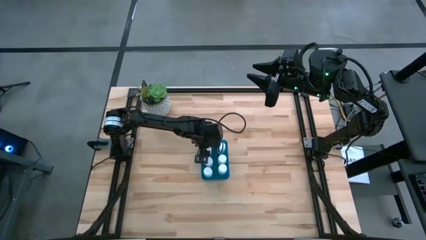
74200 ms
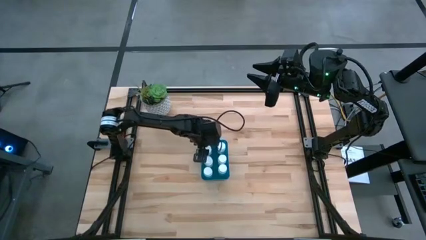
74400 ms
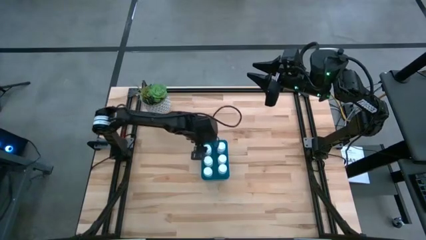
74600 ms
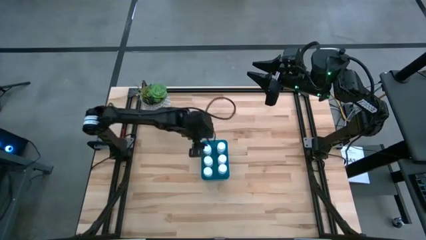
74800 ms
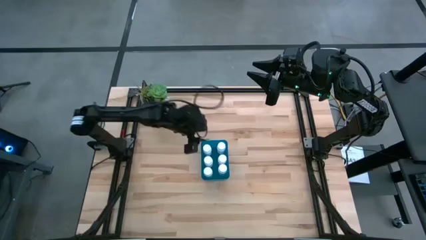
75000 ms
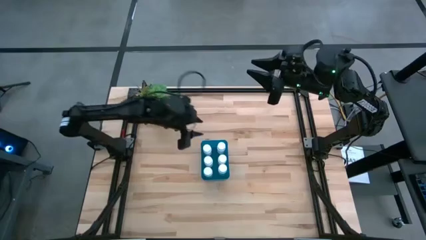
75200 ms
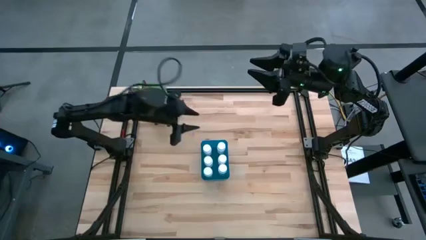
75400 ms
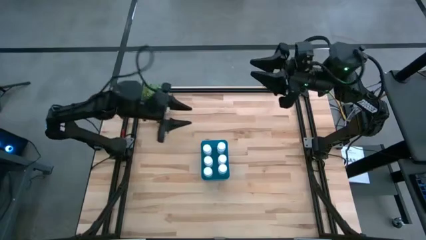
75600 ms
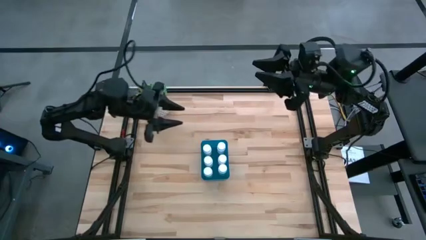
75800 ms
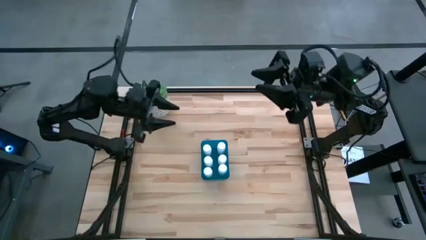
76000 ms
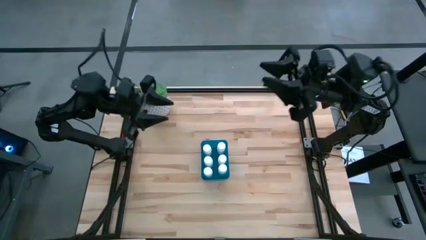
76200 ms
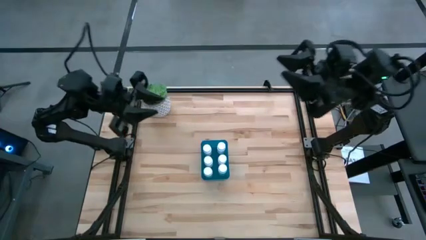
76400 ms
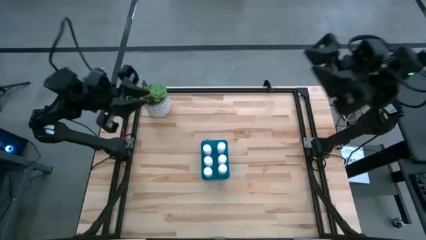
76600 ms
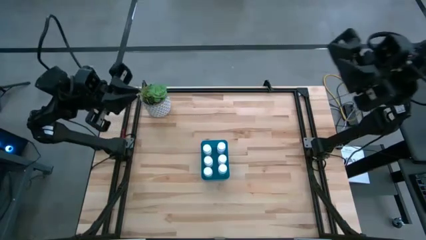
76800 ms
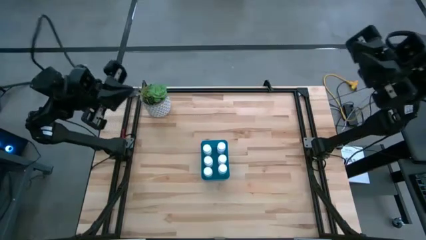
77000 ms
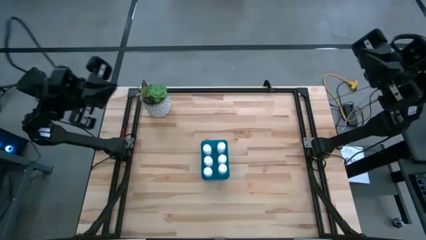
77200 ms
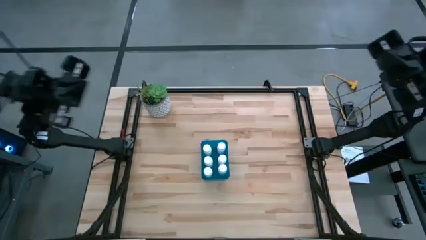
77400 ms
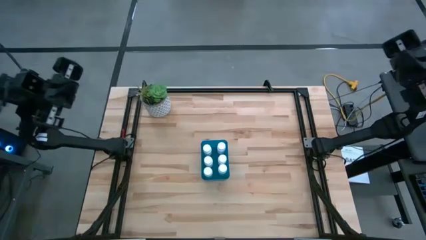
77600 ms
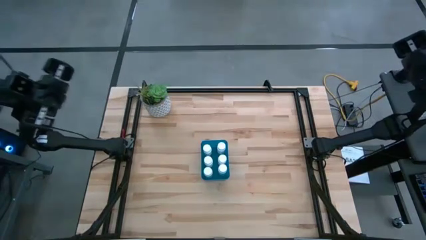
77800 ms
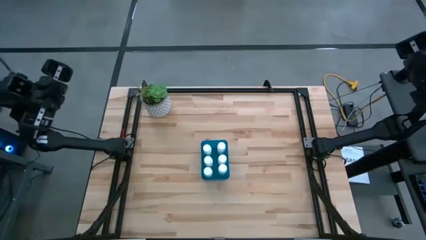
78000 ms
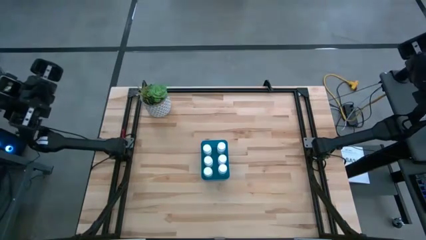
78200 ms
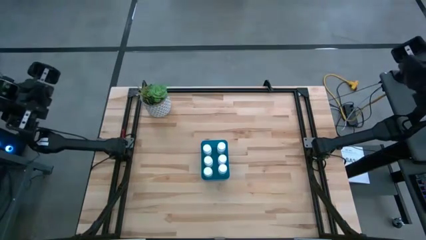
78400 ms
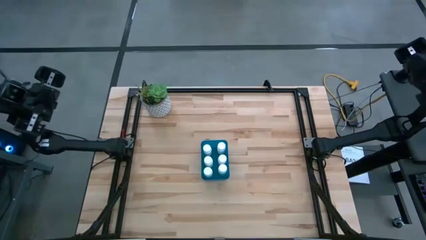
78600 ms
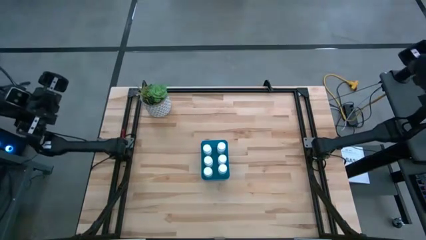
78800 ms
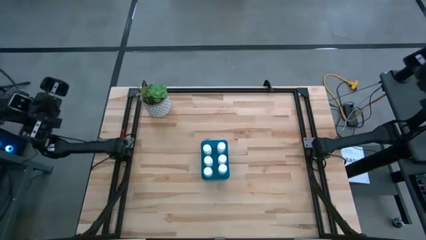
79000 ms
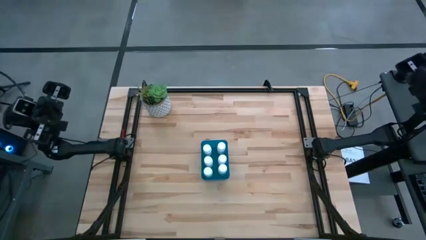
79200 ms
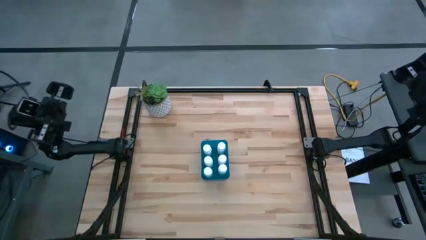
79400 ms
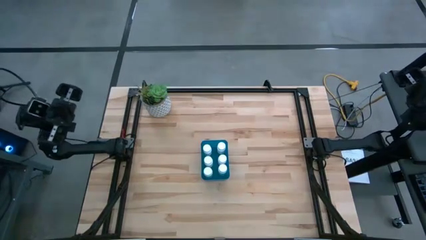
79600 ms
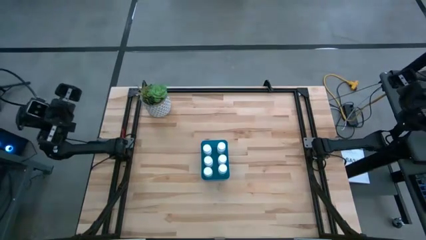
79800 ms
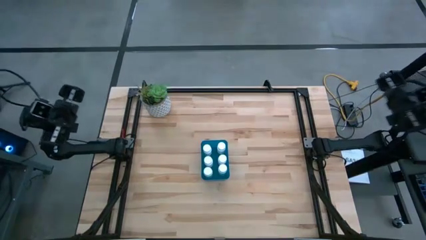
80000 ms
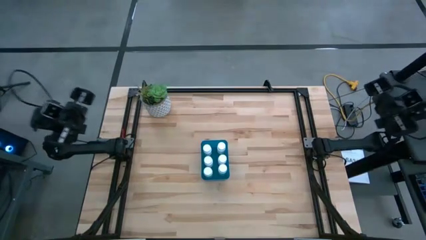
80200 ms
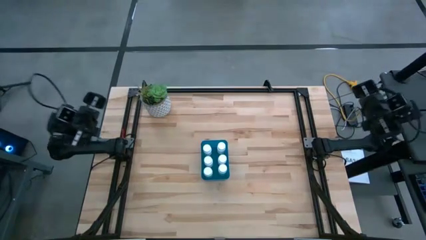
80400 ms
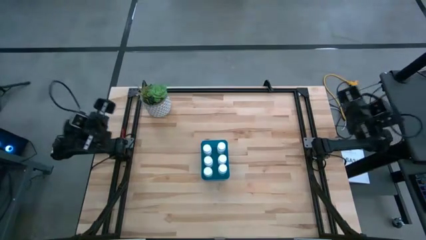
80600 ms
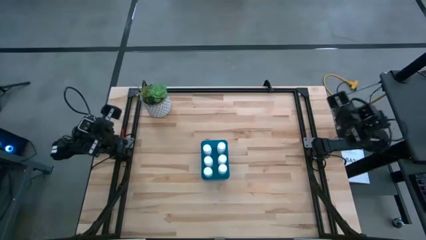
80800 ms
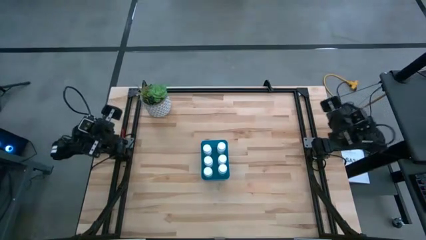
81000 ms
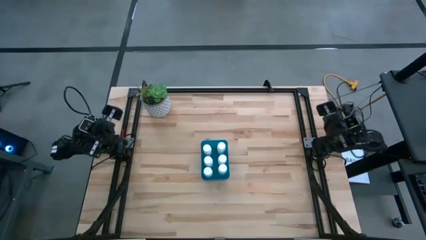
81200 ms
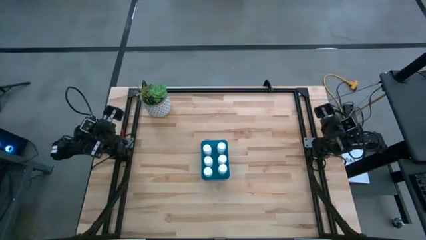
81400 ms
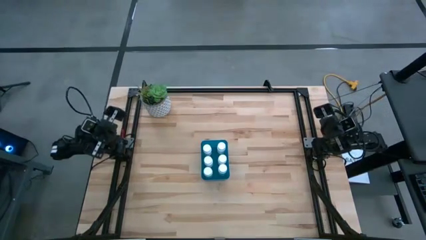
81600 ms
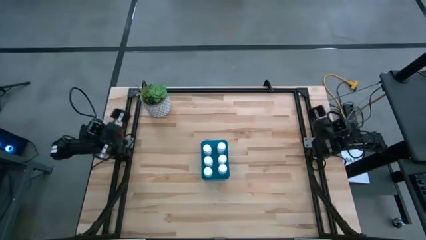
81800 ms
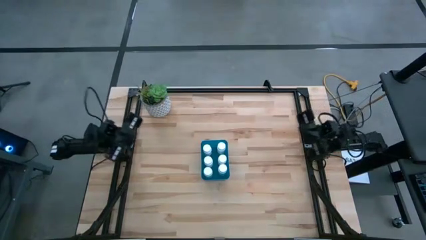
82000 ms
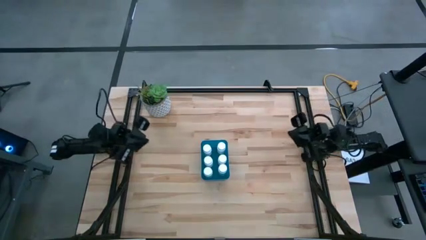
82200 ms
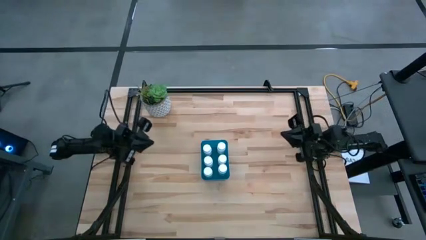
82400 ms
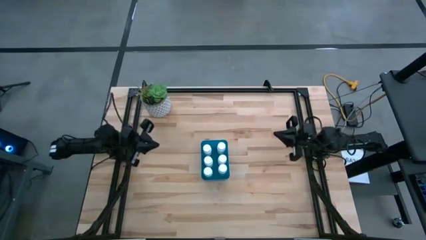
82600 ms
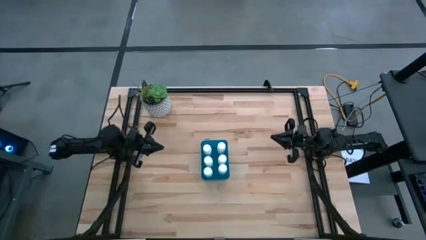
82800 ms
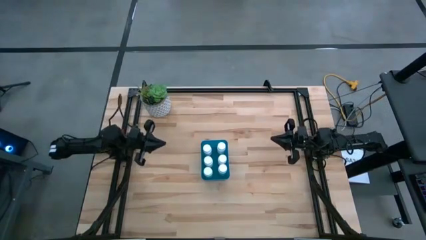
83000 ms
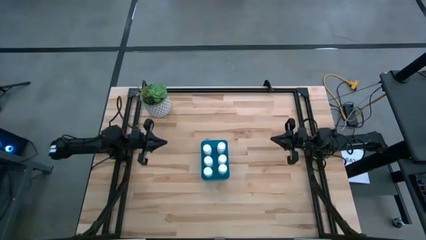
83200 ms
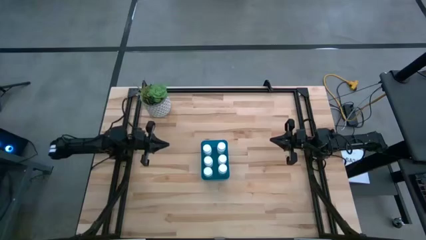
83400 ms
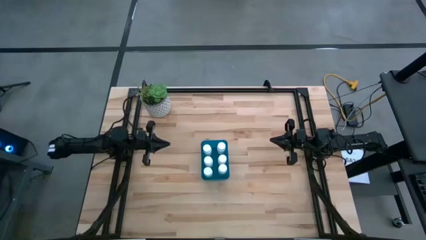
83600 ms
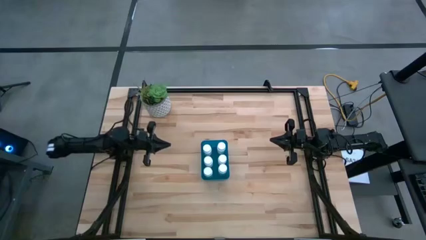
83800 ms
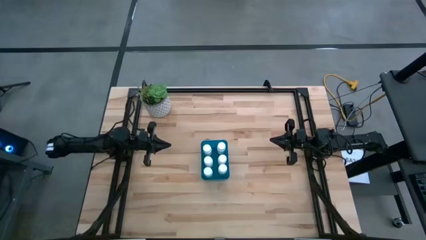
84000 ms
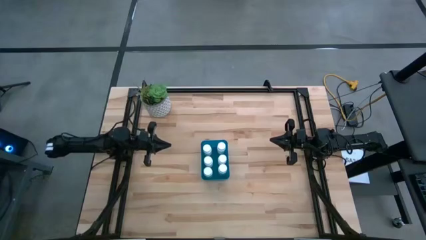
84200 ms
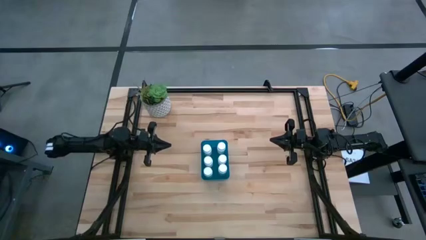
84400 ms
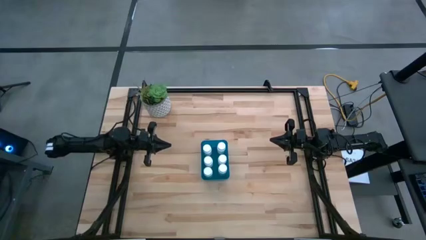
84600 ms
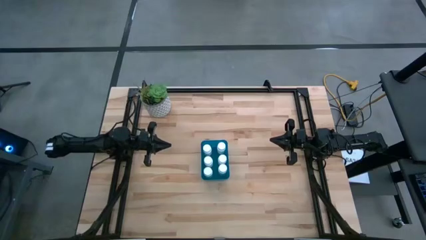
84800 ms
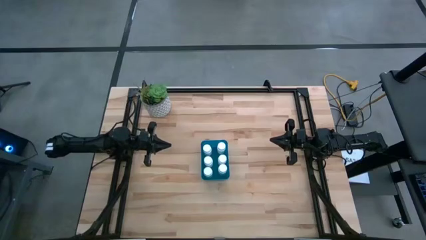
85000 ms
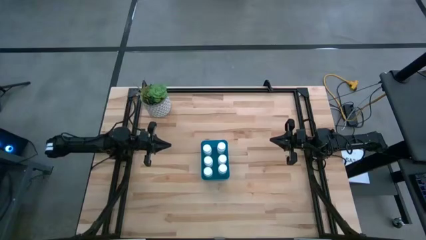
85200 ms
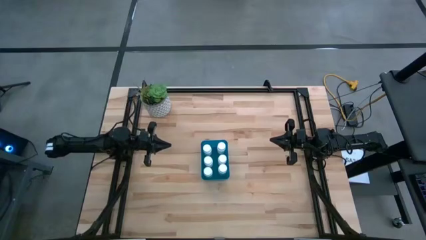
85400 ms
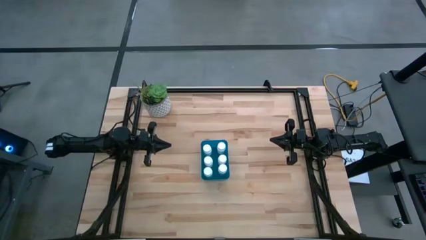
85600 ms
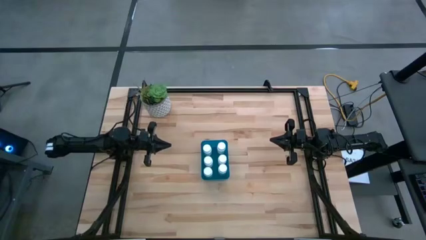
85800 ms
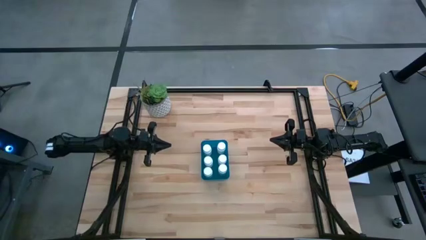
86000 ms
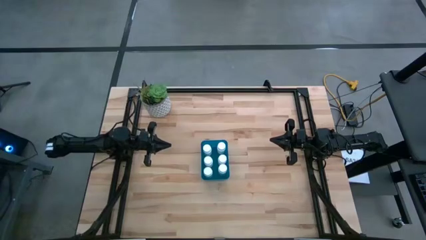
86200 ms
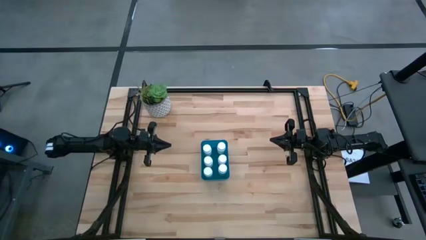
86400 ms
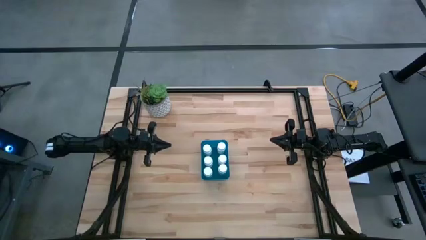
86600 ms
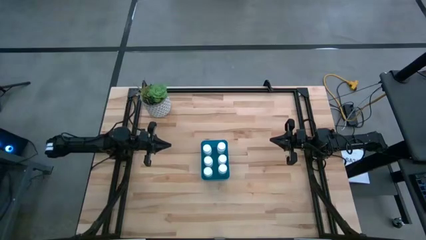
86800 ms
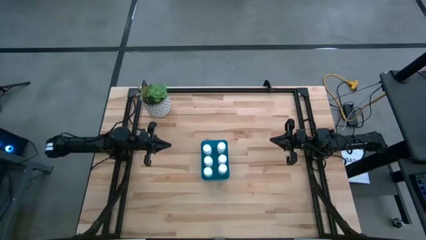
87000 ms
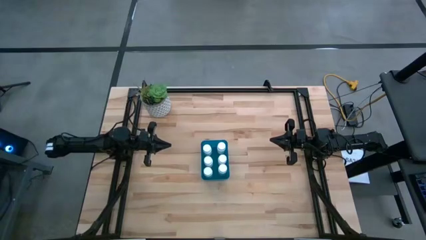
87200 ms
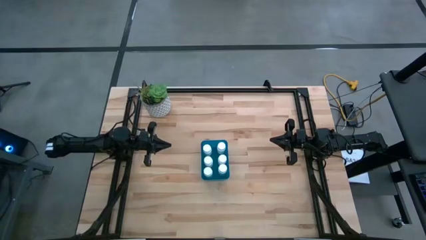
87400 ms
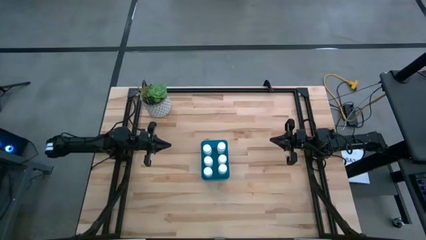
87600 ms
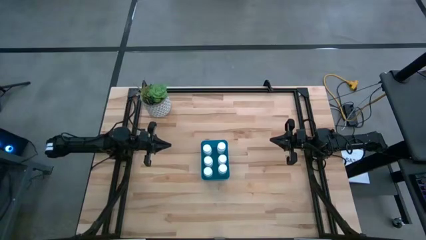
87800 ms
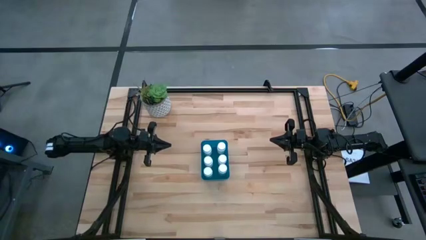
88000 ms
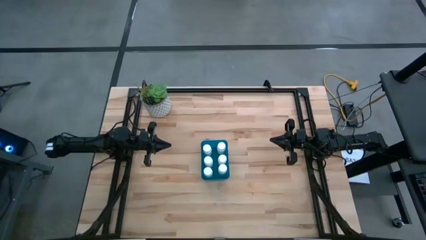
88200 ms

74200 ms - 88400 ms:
Task: Pick and place pill bottles into a basket
Return to Home Position

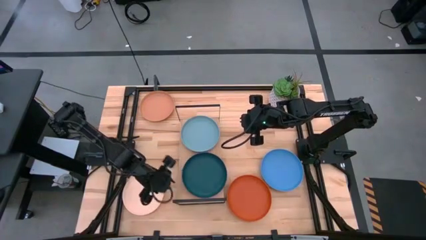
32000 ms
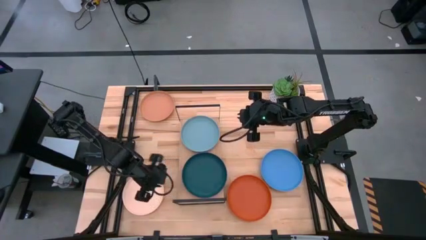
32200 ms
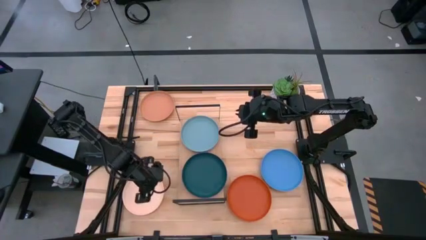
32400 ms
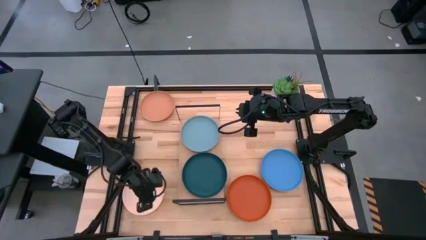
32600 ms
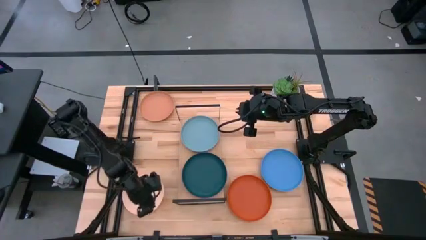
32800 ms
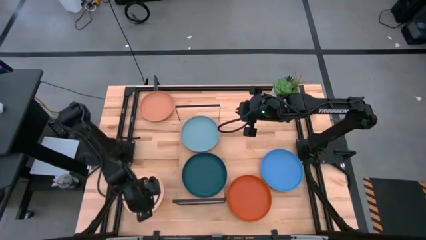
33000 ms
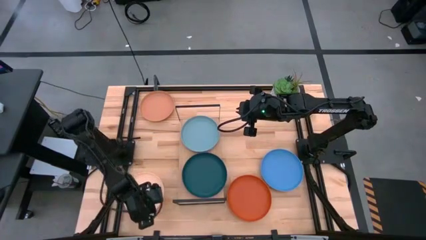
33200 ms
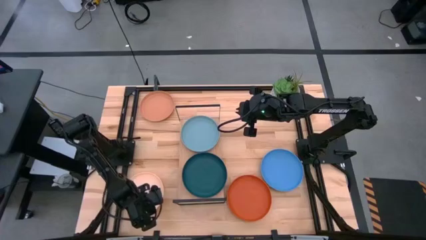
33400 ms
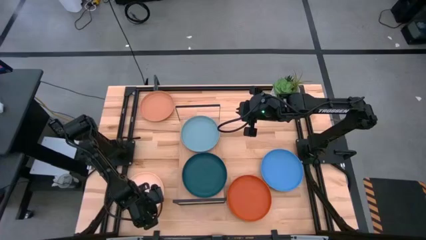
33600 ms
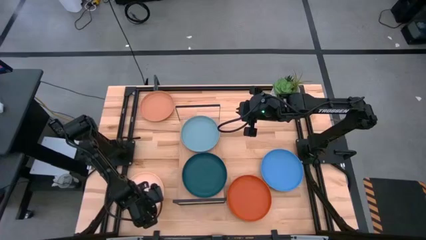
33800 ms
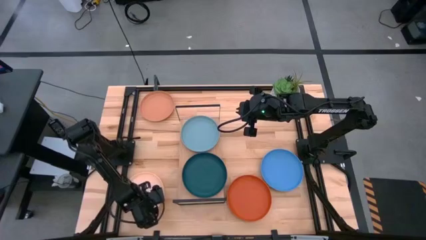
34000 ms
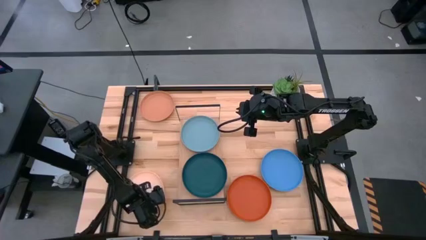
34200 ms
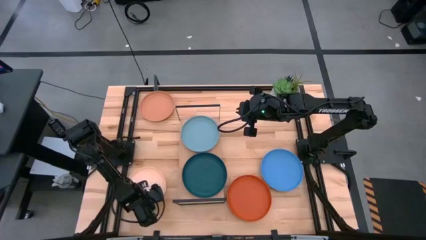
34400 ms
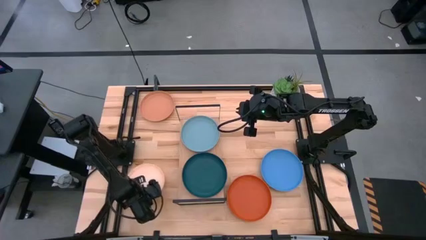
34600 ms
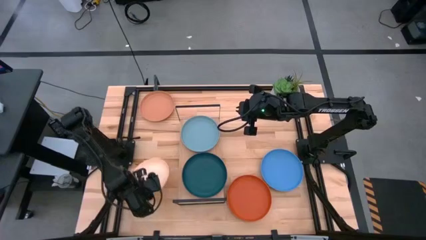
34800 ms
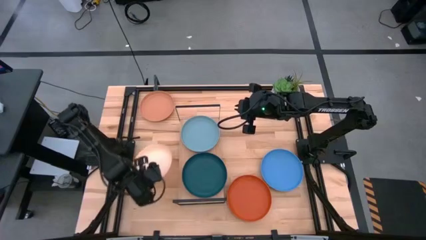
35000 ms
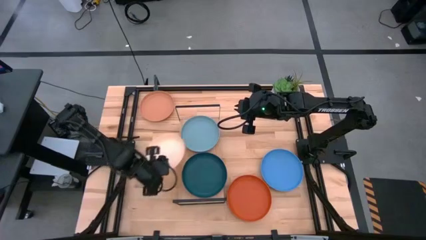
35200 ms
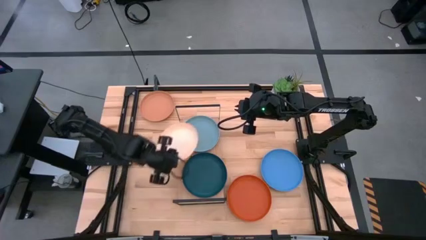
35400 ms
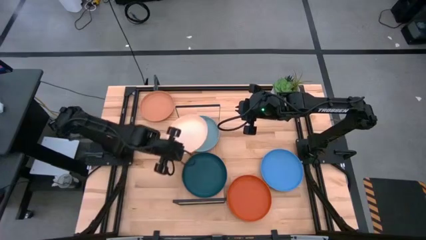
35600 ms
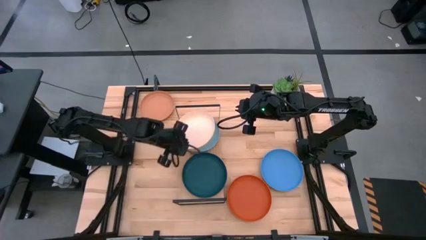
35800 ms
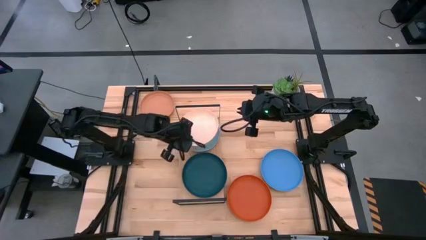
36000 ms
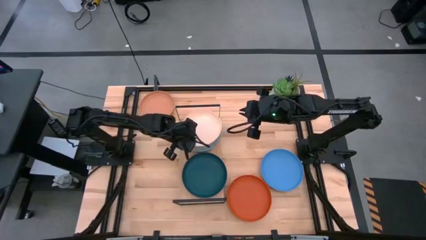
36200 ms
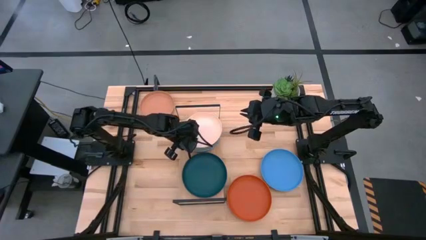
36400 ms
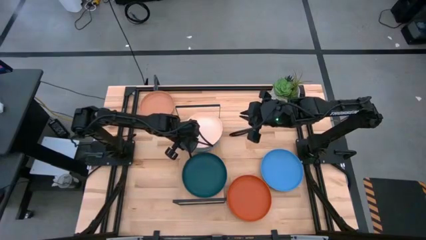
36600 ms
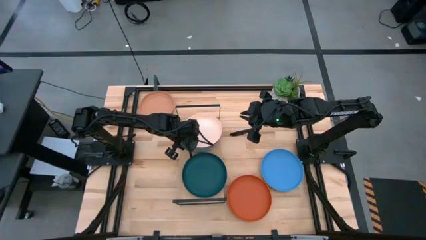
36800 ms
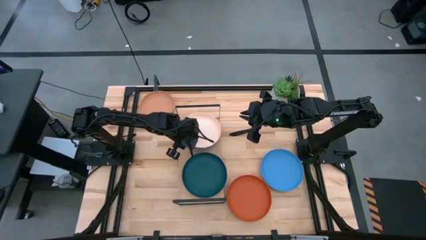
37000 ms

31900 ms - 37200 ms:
Task: Place and stack plates onto a shelf
Stack the light orange plate on top of the light blue plate on the shelf
